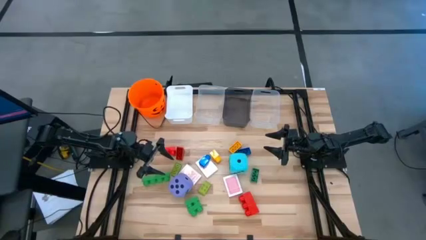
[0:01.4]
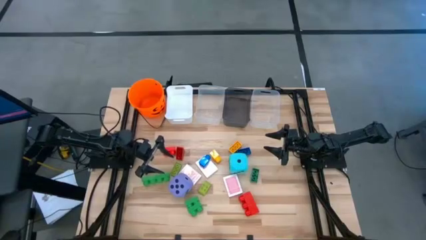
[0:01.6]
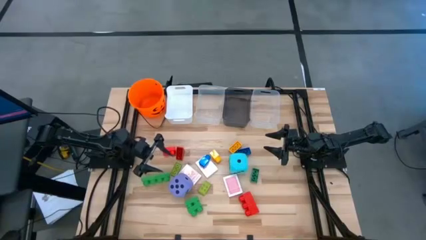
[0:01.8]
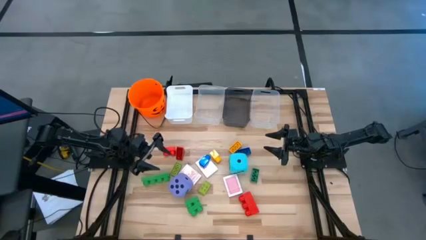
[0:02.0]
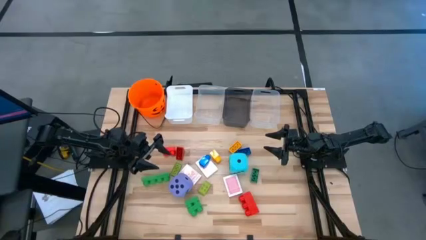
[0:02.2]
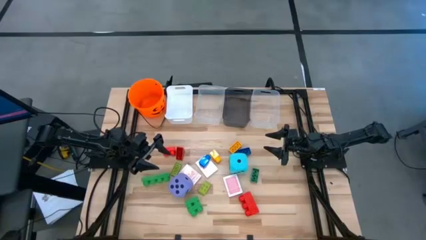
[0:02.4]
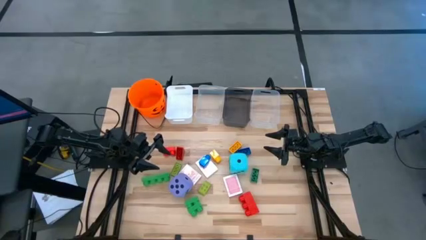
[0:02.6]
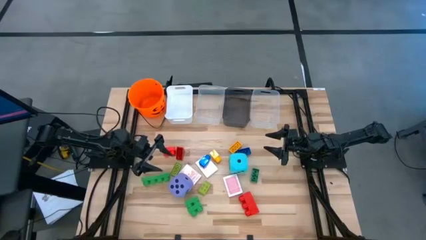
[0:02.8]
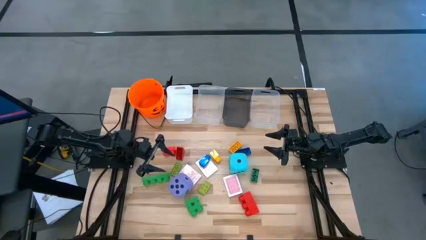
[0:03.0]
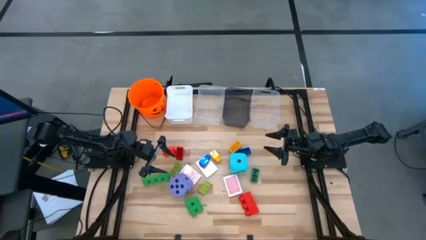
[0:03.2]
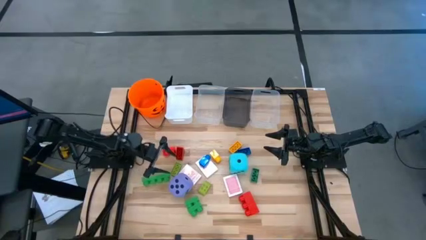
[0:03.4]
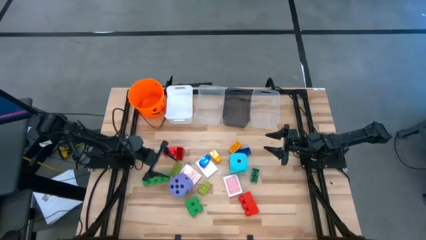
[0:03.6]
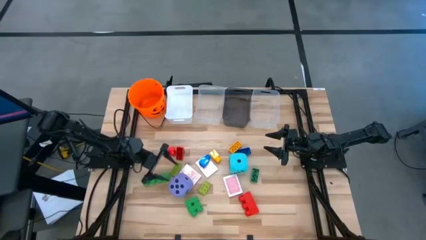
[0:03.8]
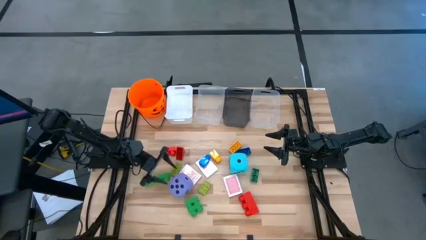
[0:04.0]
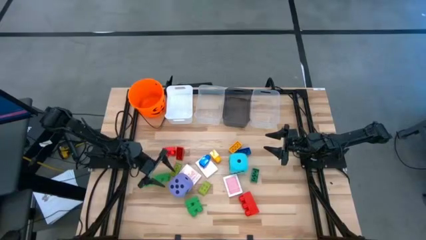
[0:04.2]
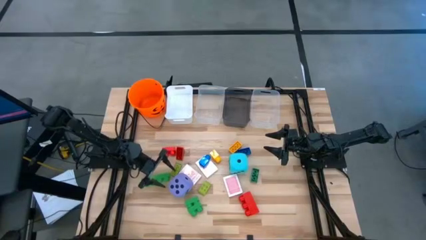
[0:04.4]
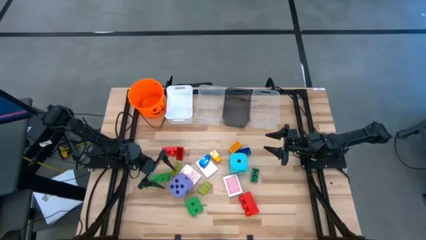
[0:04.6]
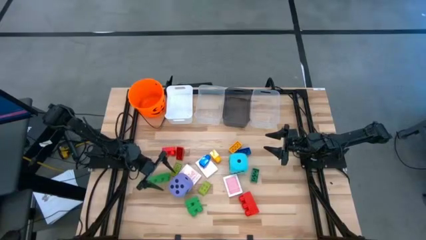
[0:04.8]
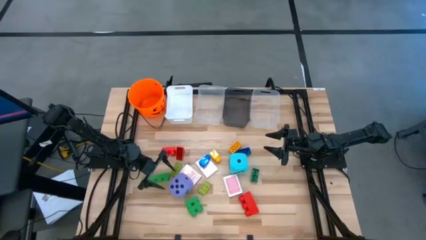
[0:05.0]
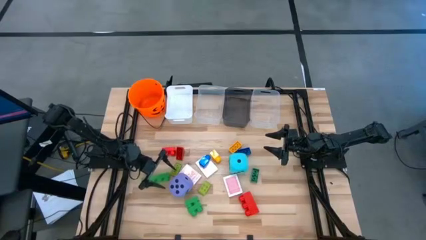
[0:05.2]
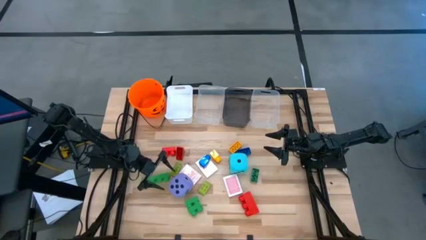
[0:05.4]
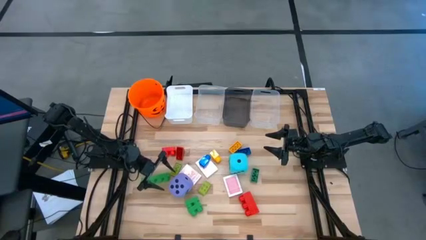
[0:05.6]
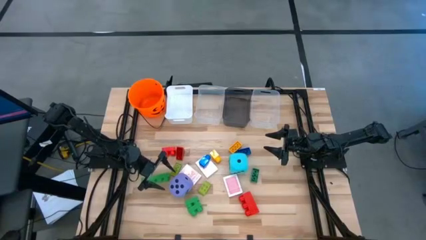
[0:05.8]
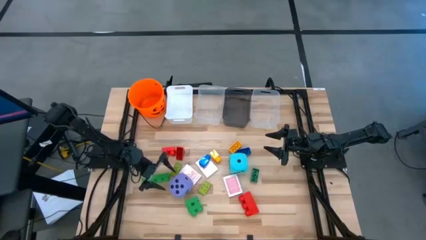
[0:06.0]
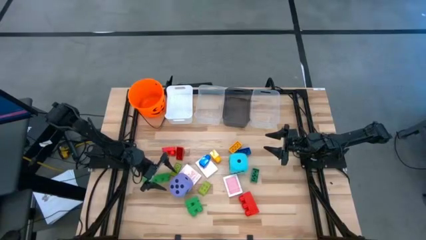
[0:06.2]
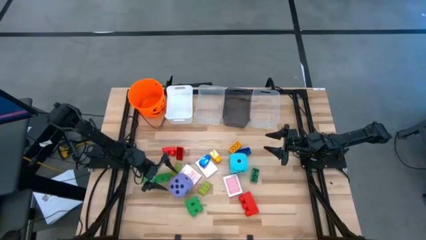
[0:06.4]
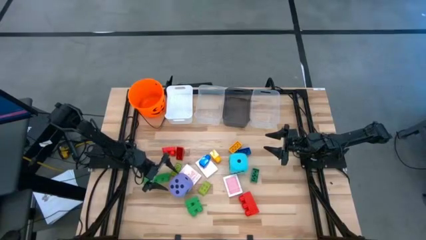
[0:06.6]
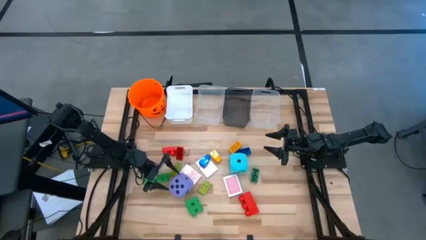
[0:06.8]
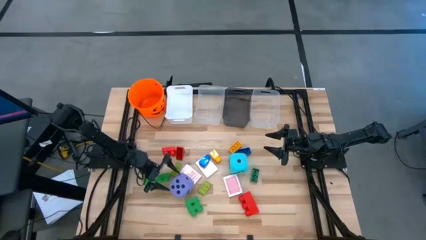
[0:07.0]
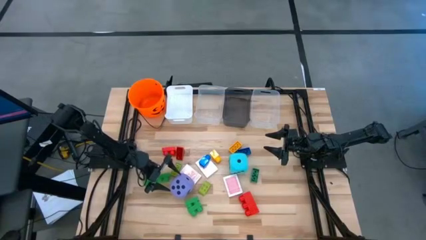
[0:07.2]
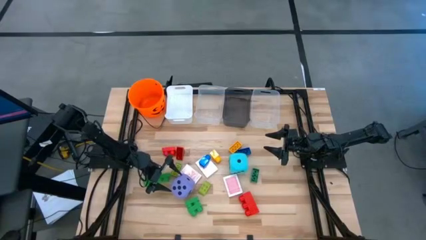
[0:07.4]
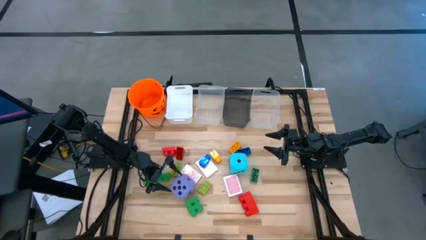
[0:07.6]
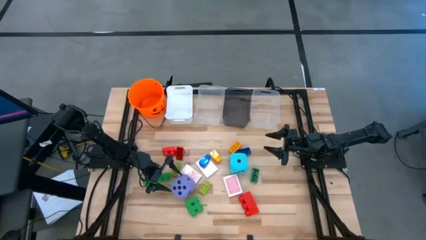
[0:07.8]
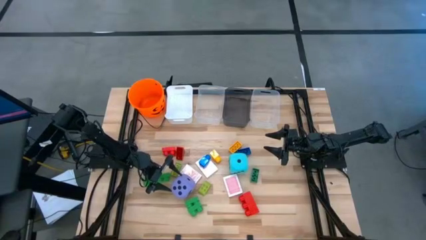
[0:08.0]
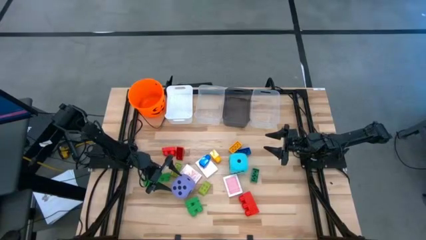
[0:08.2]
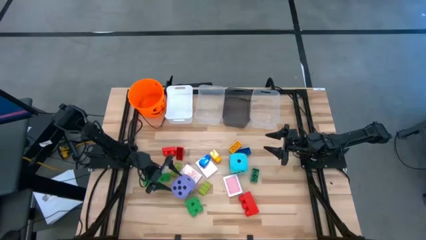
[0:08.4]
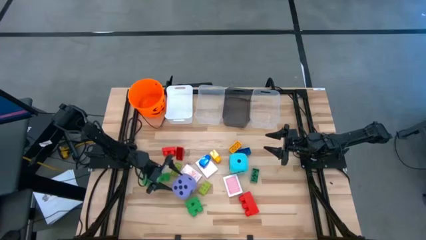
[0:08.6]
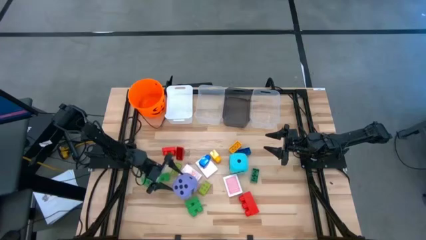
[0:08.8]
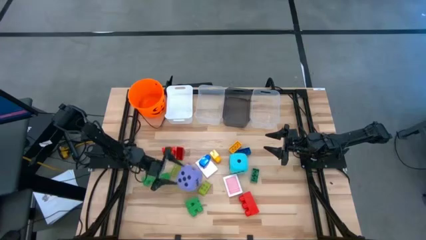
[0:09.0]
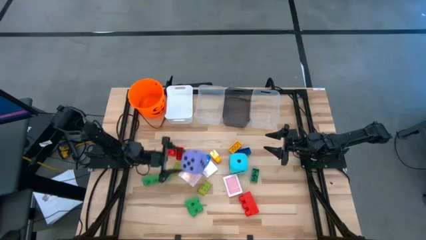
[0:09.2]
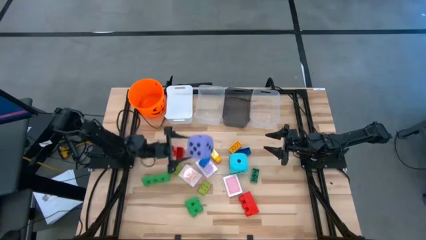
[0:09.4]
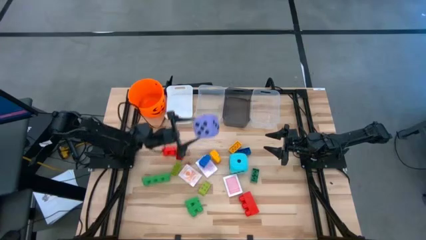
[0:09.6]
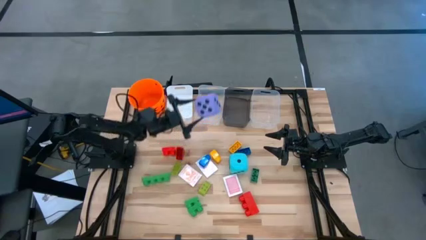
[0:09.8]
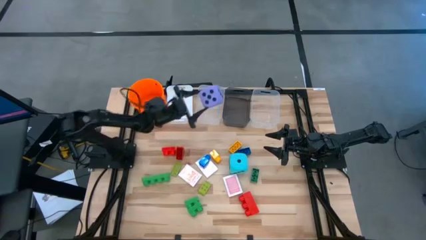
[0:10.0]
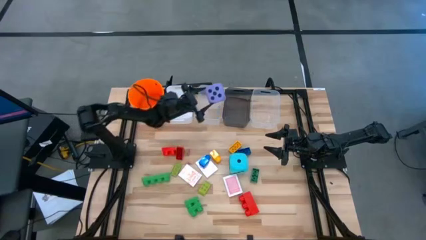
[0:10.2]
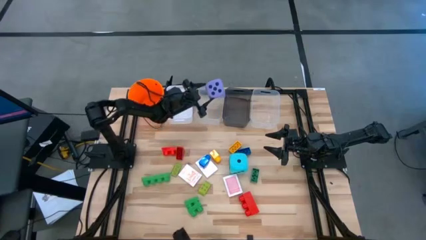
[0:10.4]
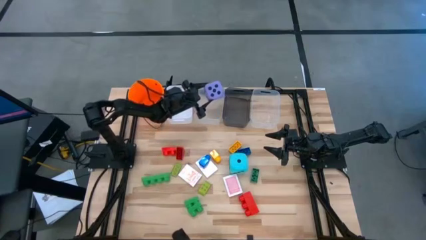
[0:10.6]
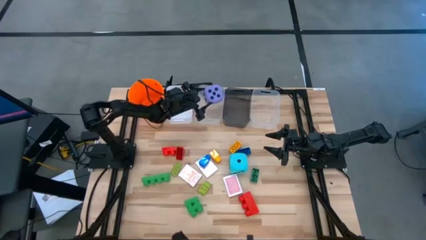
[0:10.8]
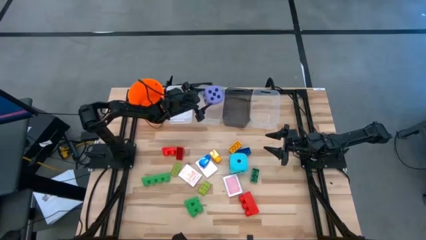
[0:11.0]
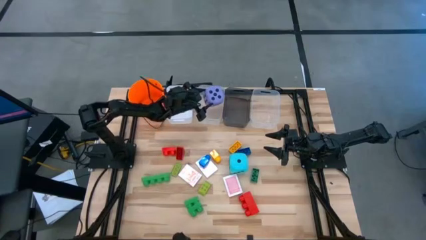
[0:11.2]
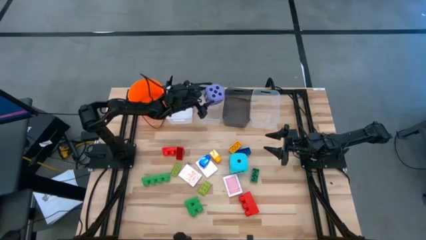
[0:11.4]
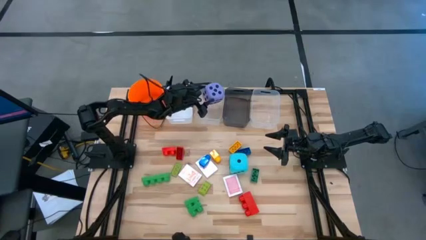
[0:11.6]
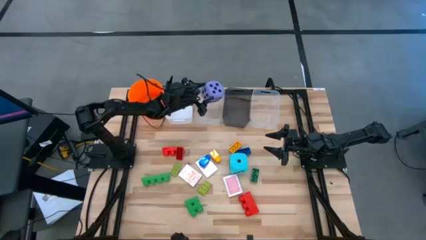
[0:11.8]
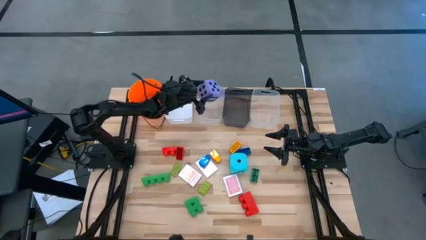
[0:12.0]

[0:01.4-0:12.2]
Task: Pick & Place Toys
Put the violet dice into the left transparent bin

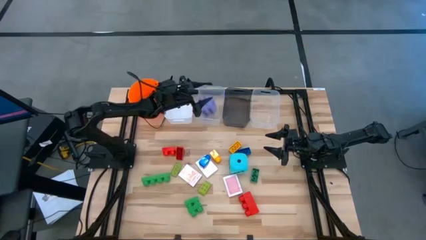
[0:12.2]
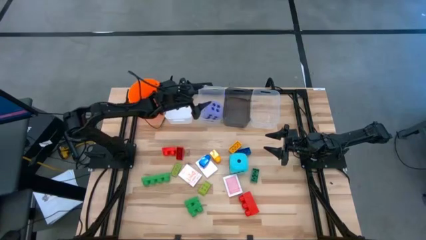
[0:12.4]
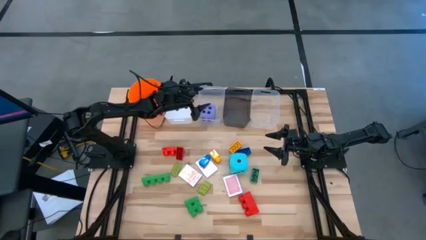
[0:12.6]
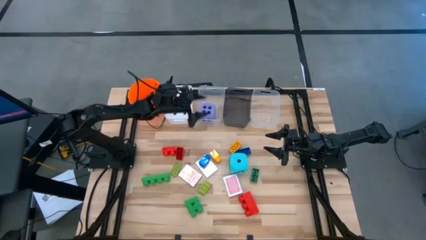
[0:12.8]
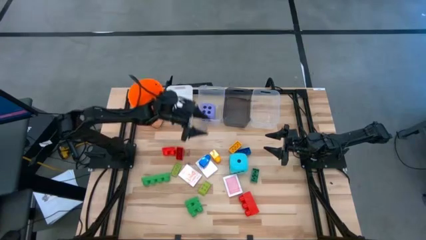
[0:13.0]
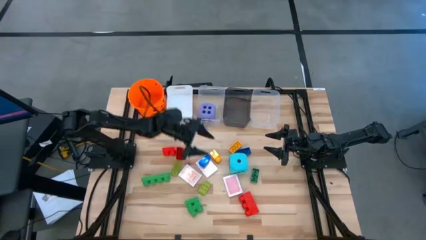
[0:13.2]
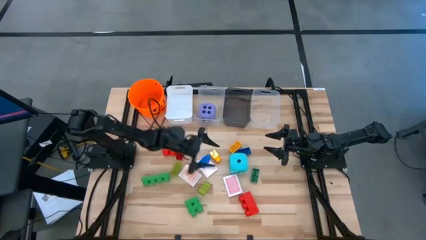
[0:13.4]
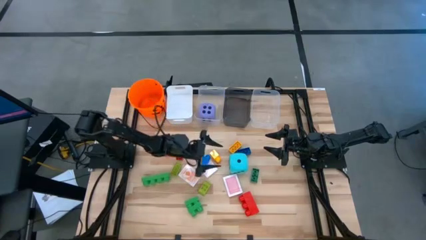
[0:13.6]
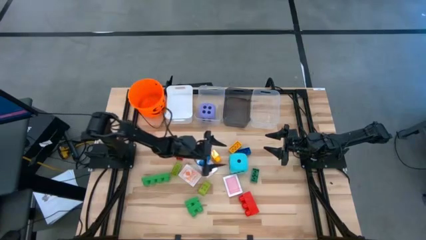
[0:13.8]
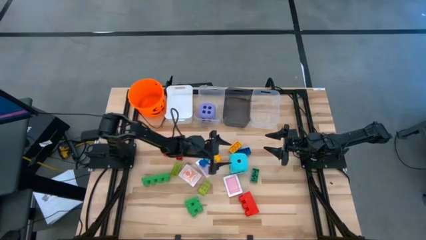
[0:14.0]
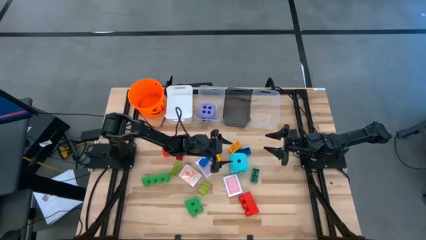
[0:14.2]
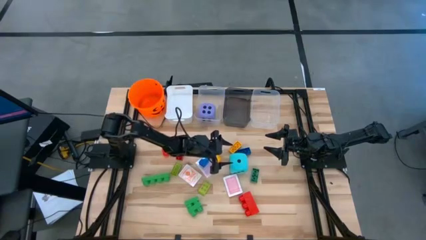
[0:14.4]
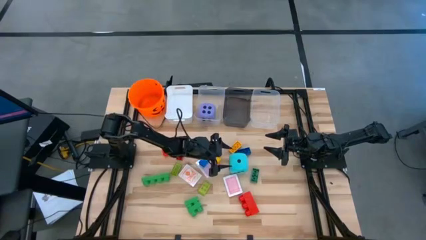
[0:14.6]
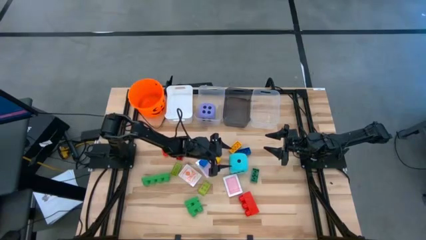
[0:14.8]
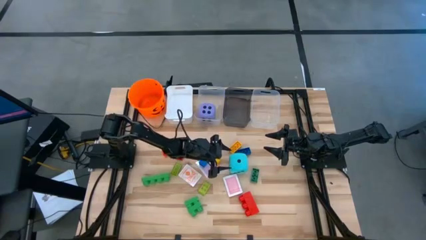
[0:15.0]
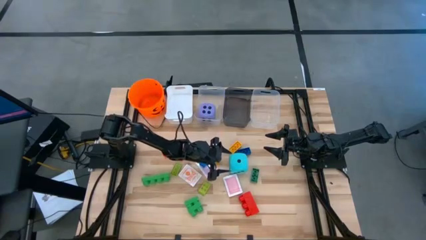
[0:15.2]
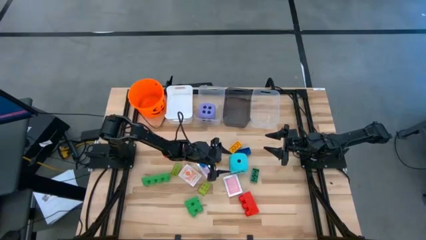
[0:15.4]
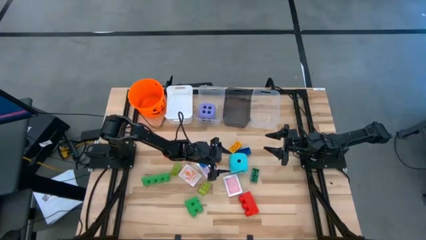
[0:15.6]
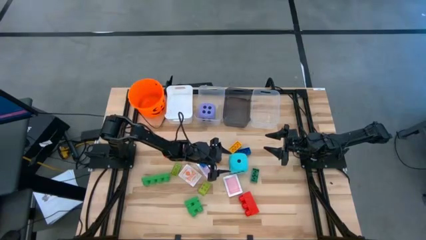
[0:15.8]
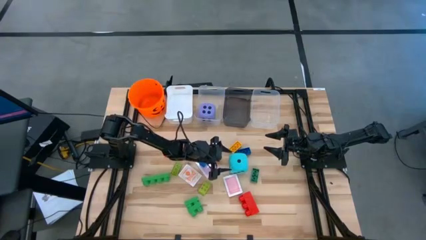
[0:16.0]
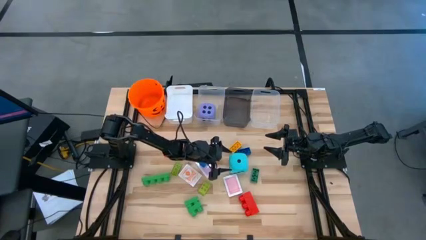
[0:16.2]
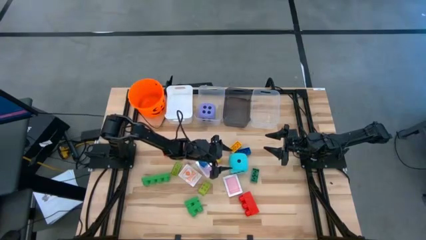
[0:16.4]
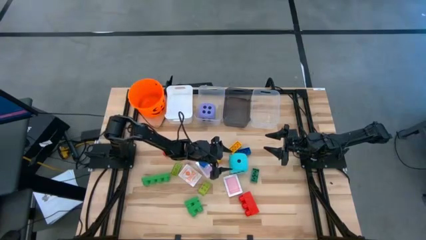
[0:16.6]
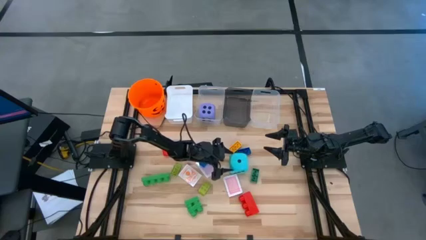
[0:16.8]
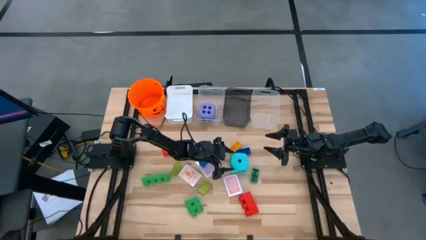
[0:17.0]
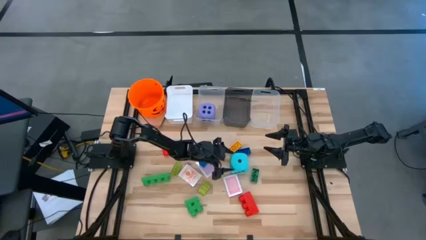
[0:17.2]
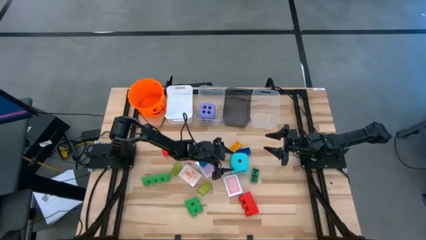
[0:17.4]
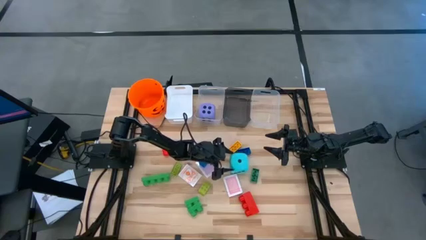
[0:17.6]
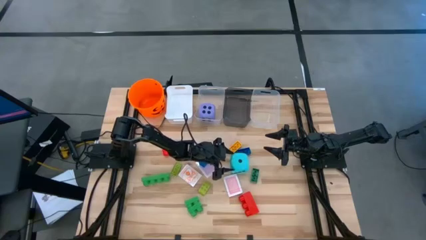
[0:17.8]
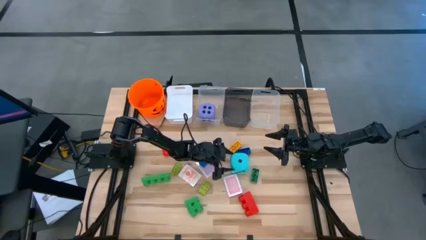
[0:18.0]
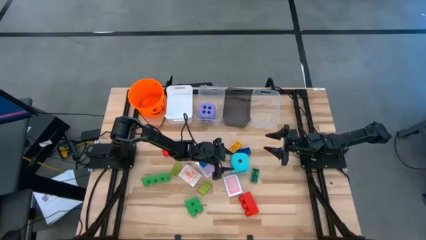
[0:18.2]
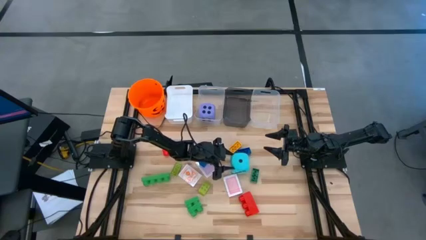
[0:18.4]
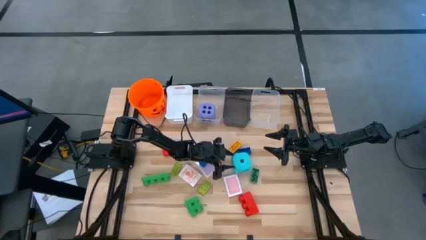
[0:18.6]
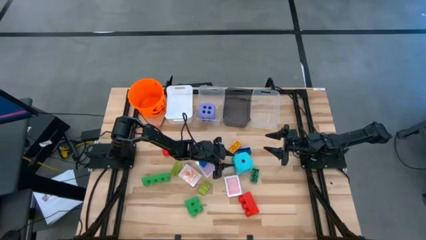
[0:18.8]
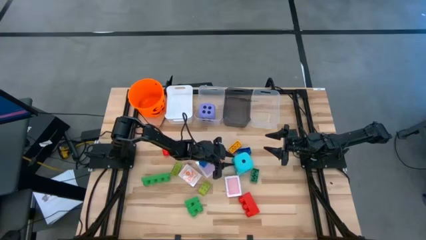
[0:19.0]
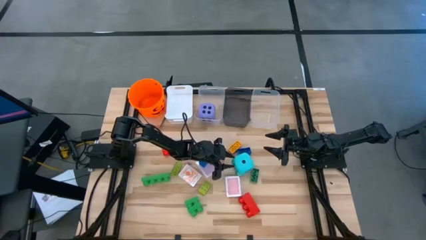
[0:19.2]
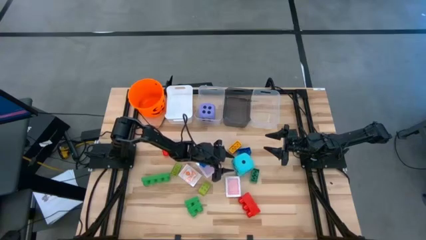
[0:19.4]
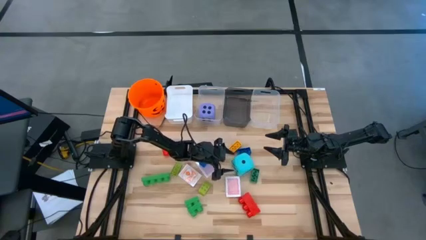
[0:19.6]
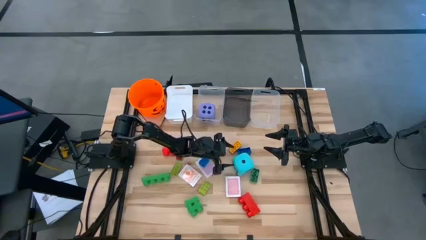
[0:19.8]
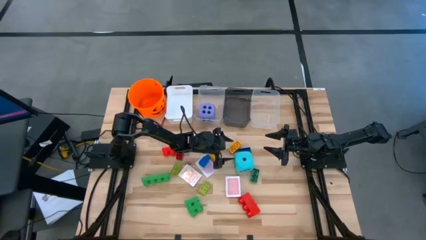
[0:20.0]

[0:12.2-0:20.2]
Put the blue dice into the left transparent bin
